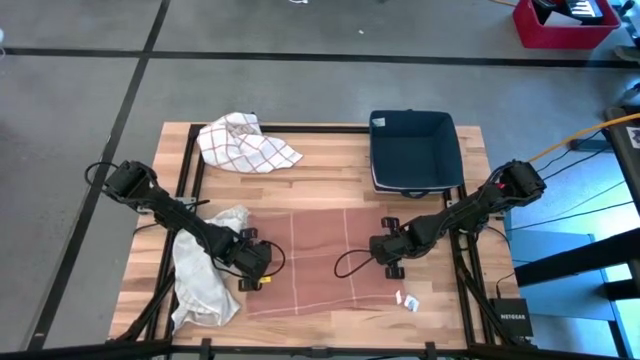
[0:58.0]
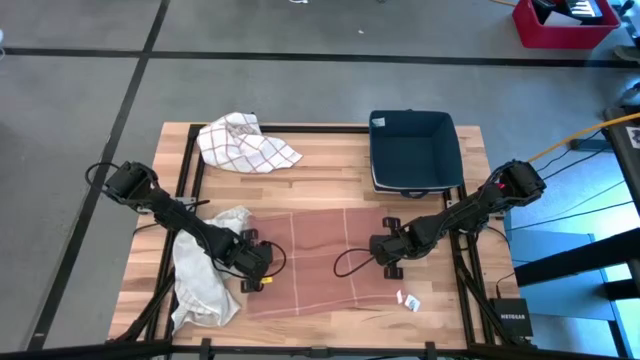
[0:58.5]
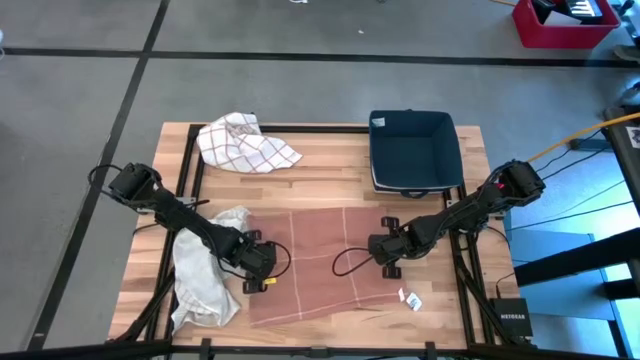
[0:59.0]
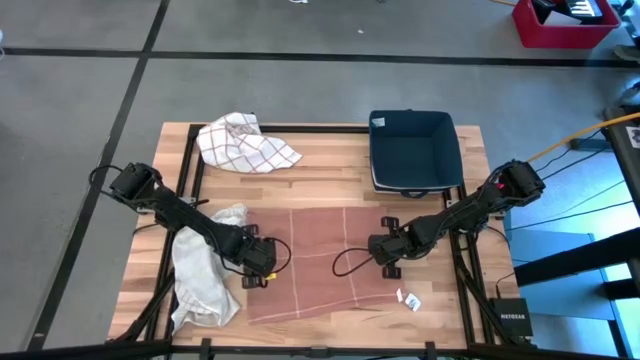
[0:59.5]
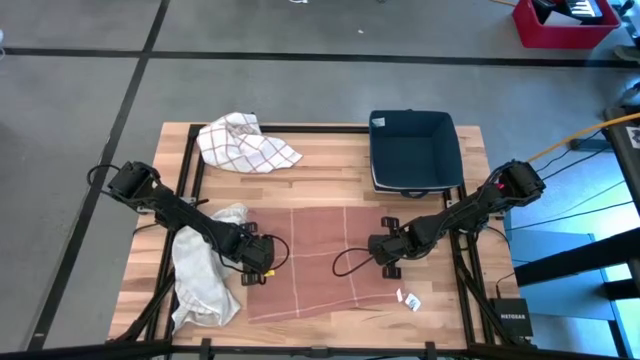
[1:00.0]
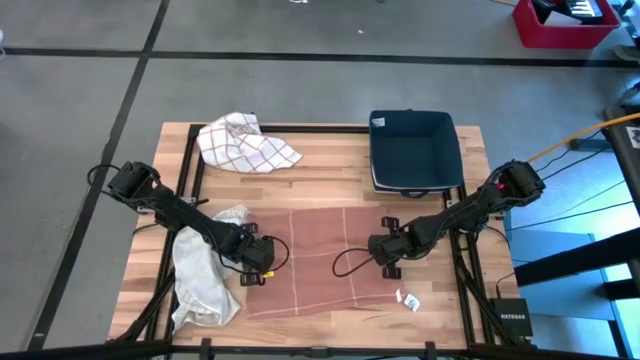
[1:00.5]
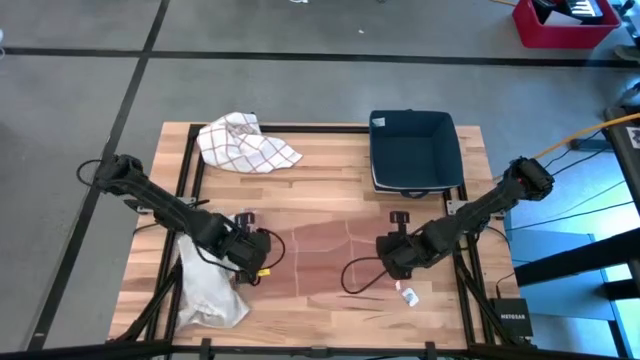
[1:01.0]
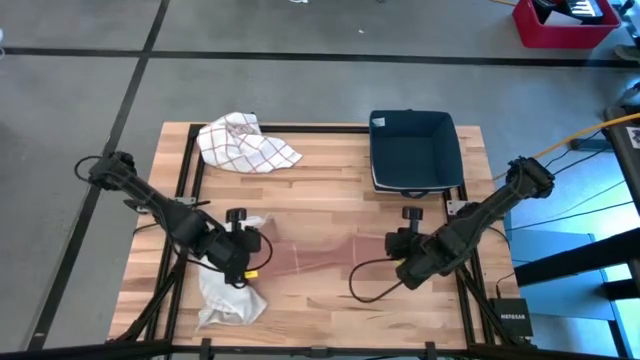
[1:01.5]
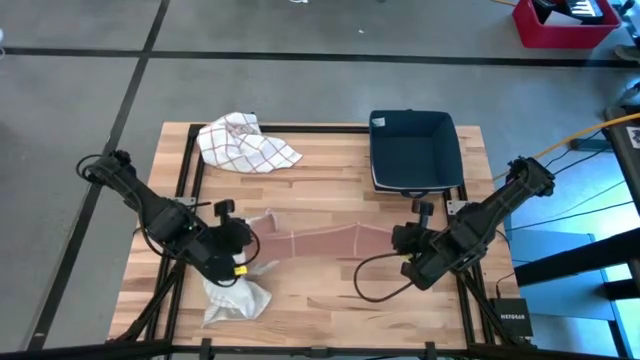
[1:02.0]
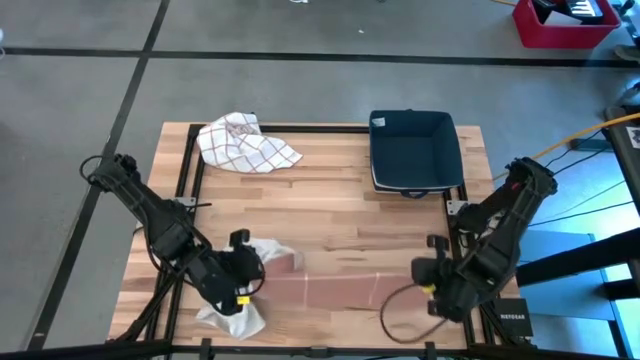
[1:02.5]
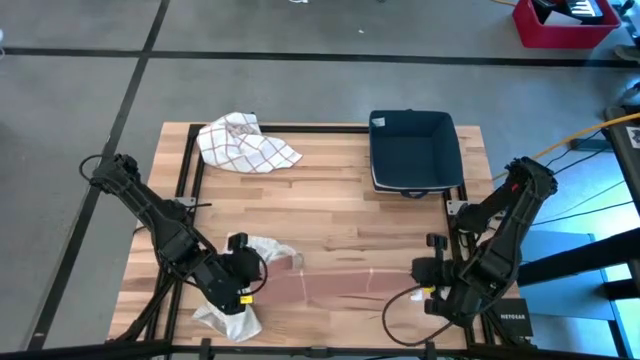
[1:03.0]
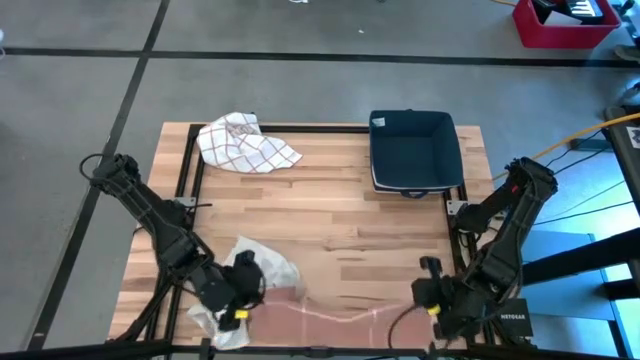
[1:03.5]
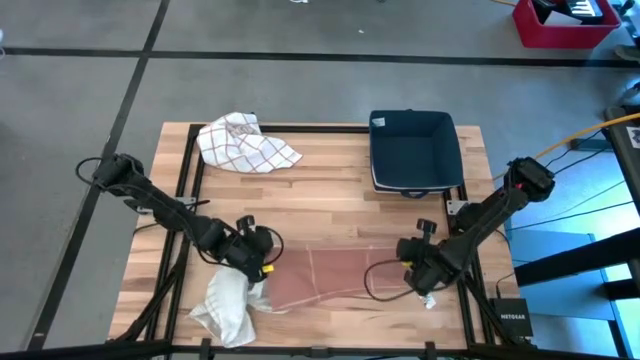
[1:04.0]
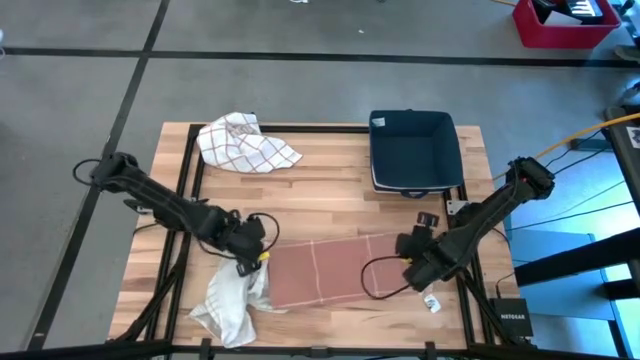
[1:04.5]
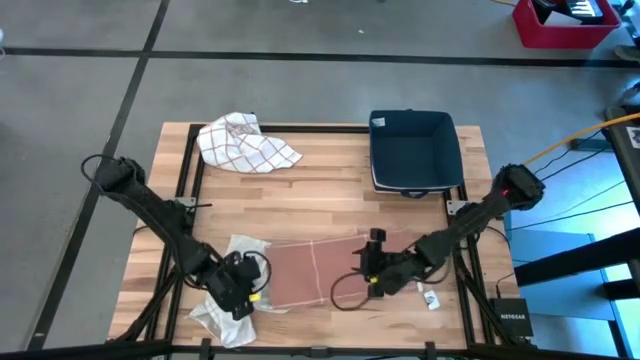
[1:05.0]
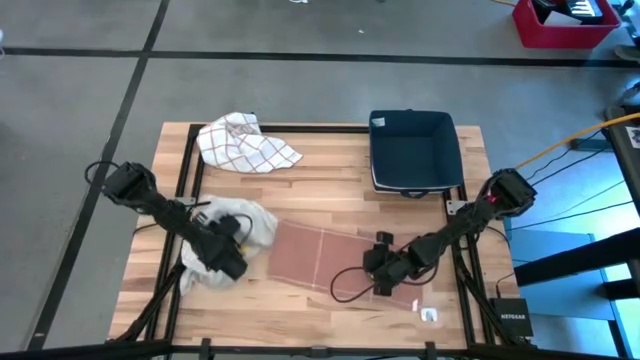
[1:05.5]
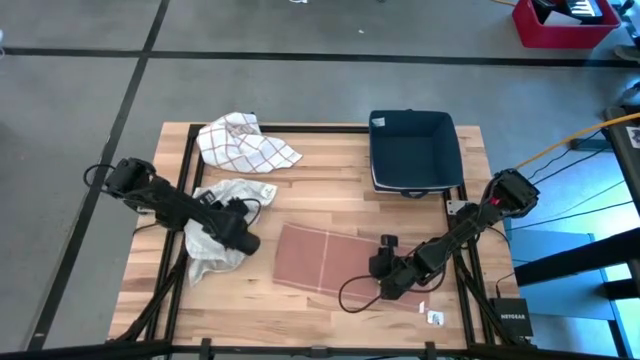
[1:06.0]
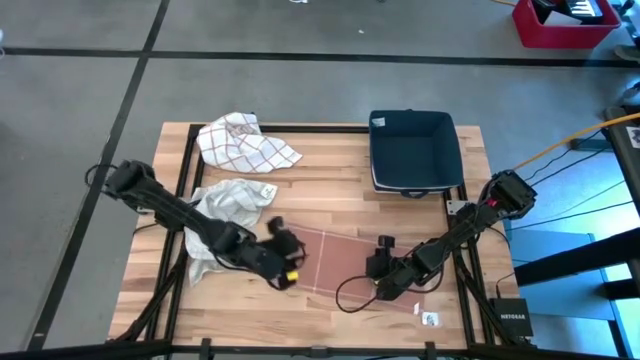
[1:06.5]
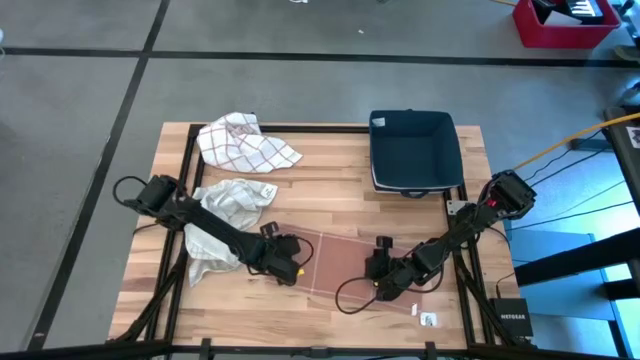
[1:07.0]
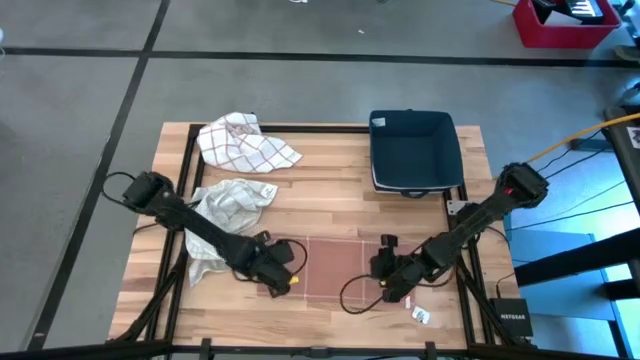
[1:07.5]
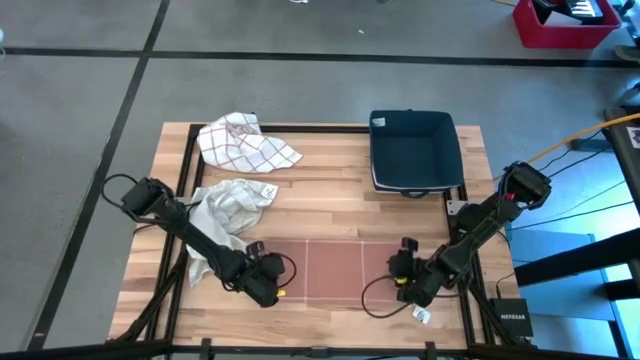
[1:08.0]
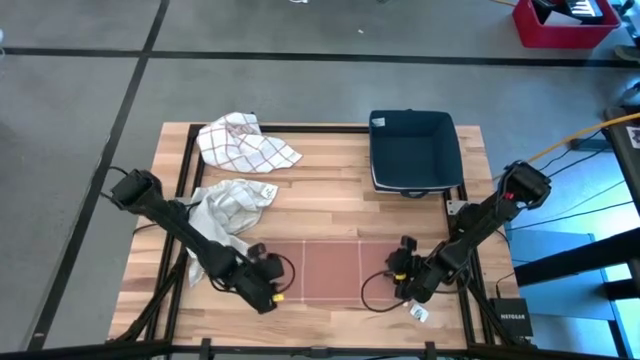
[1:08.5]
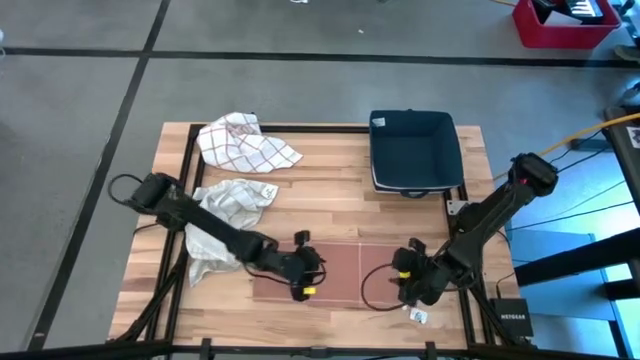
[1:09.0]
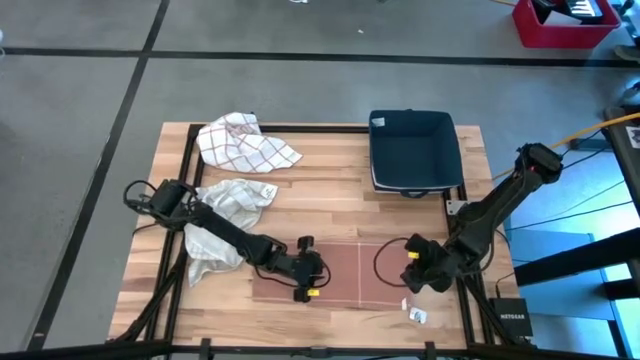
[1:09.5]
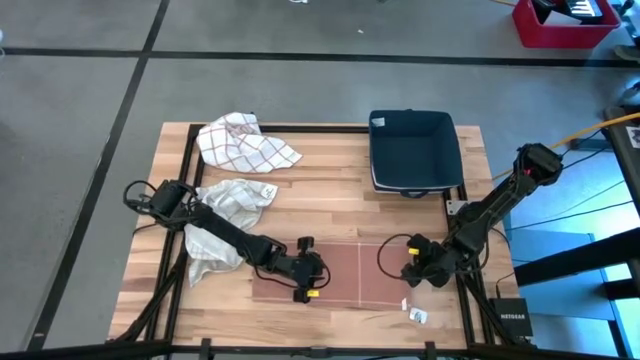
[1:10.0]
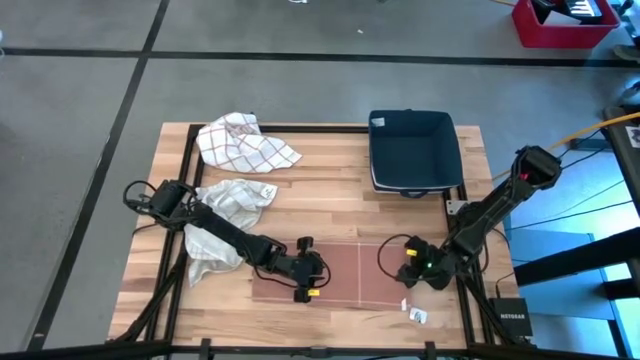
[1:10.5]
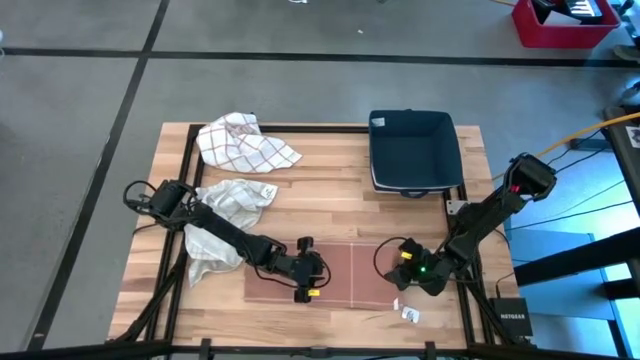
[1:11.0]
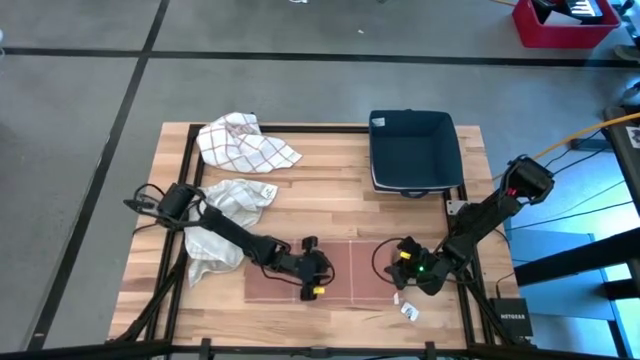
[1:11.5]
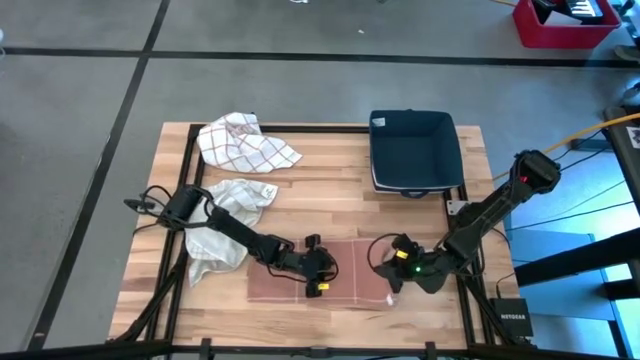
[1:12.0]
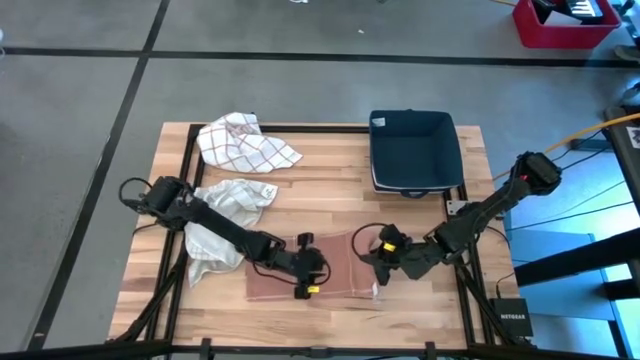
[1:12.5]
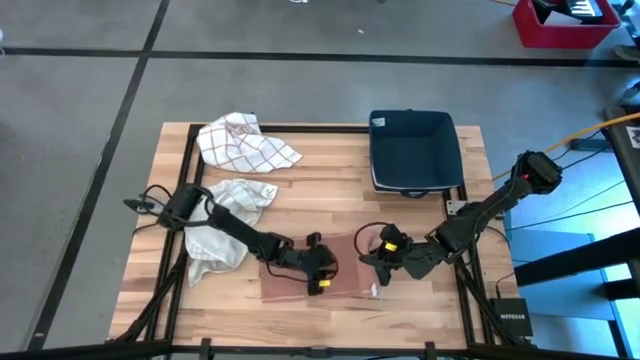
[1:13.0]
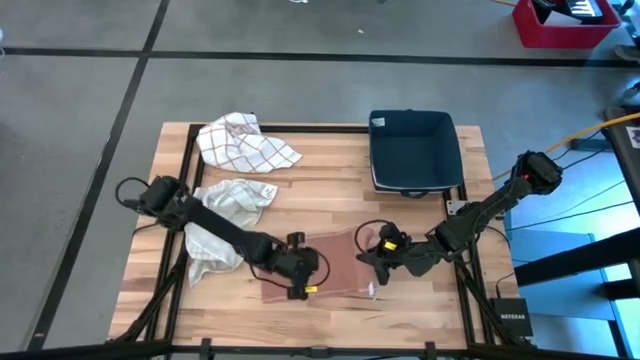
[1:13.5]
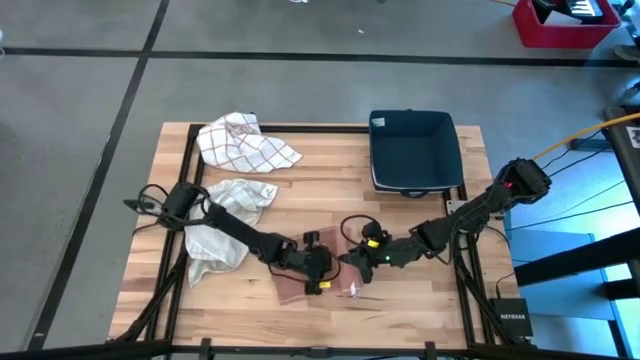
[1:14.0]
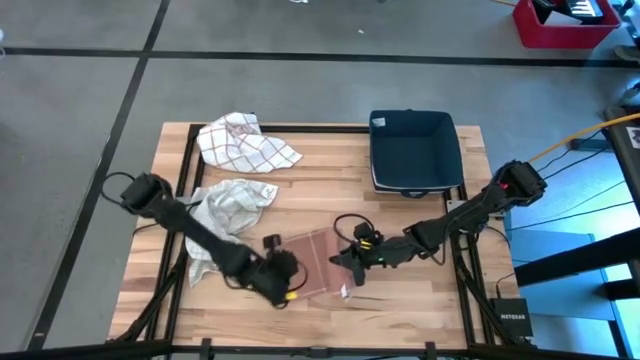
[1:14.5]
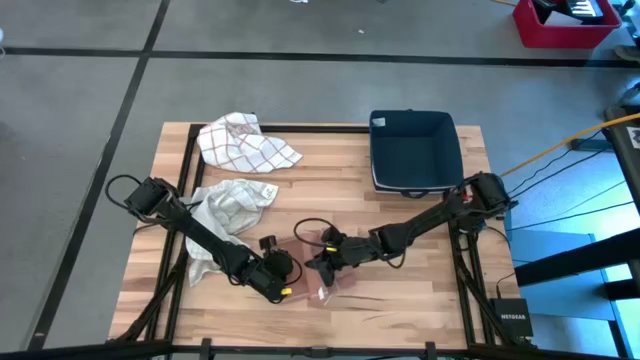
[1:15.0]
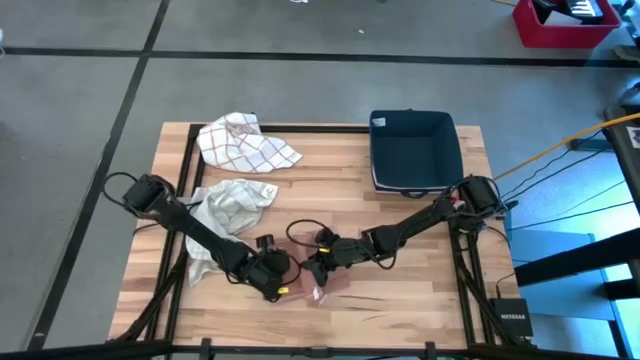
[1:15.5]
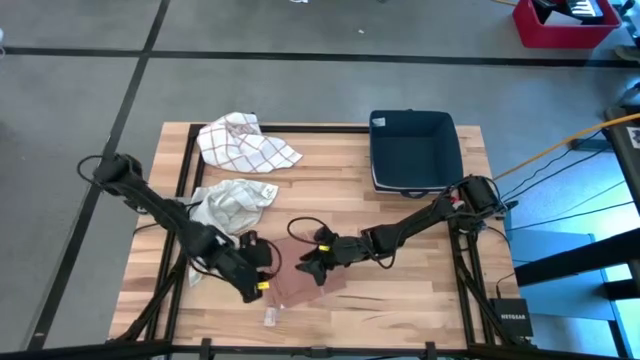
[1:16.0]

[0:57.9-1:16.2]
Task: Fold towel
Fold the brown towel

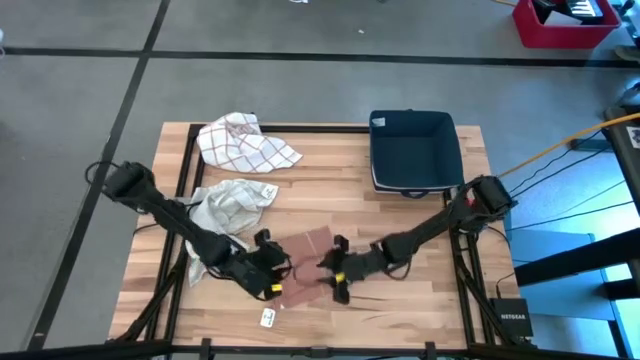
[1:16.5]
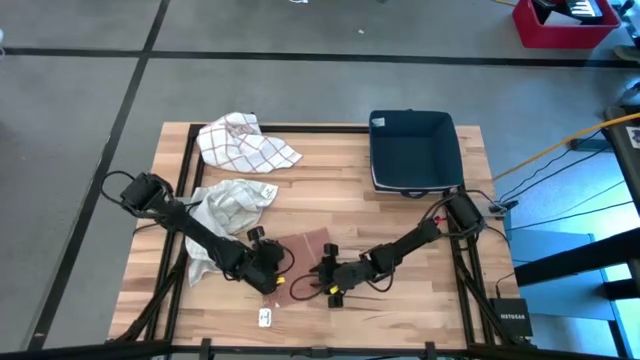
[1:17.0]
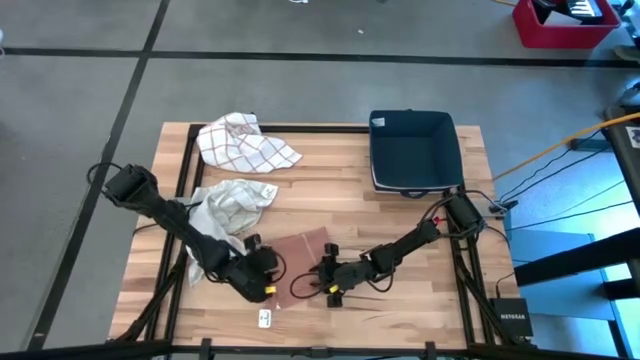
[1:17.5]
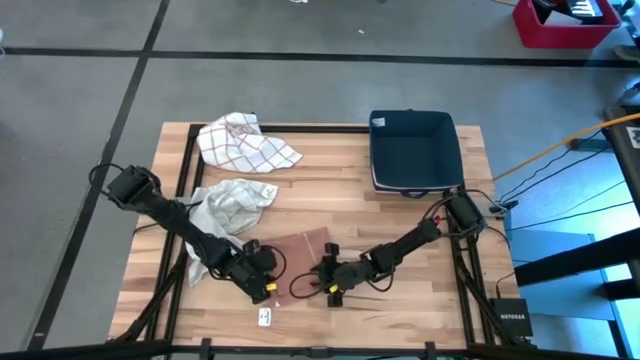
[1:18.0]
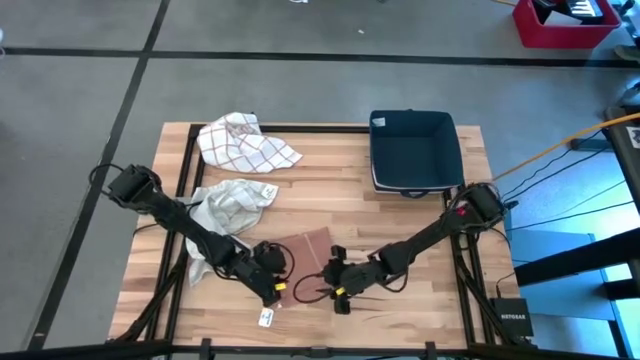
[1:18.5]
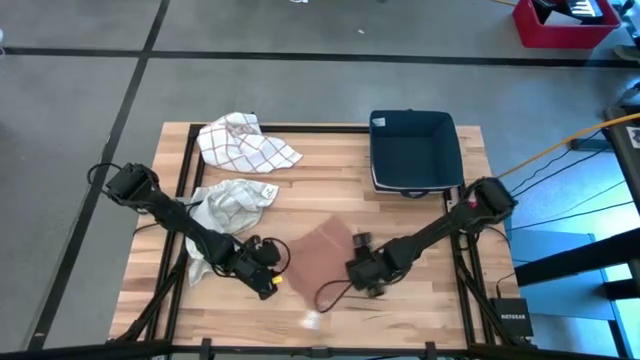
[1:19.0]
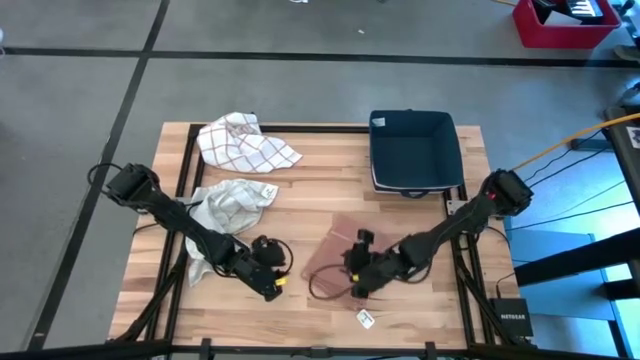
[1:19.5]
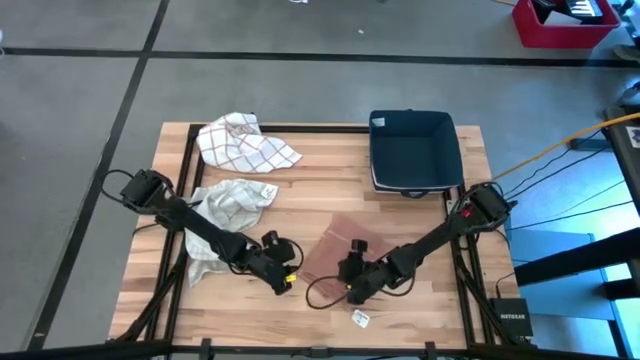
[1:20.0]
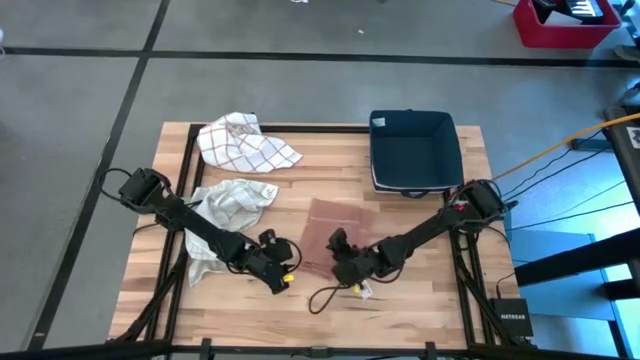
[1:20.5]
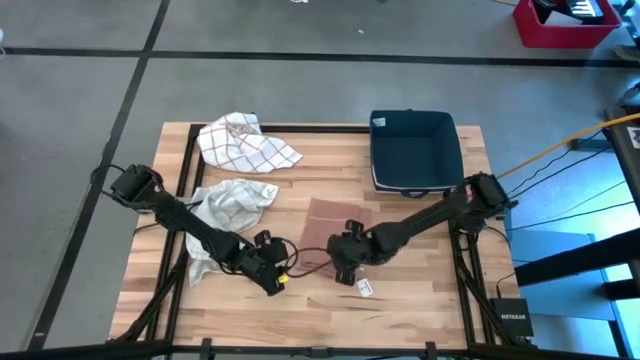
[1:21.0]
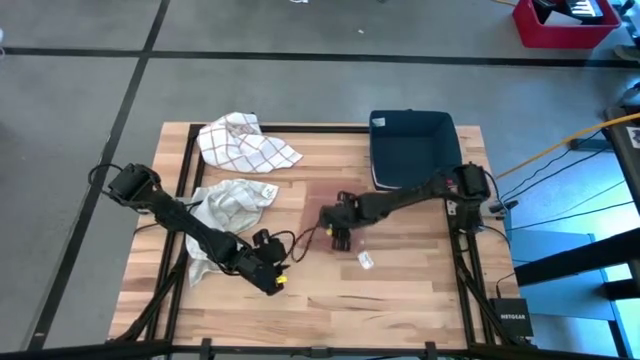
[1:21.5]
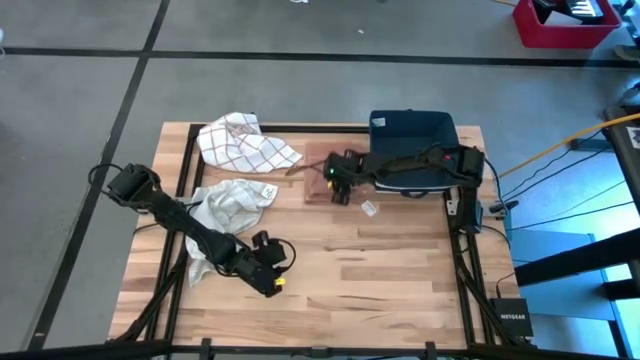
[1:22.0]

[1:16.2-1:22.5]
Move the brown towel to the top center of the table
